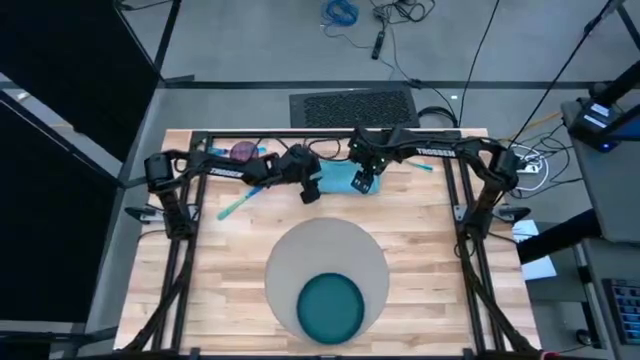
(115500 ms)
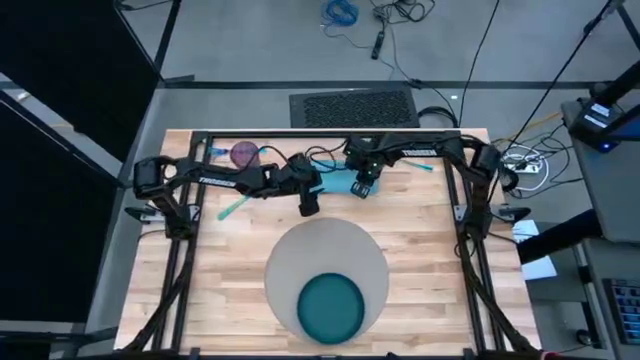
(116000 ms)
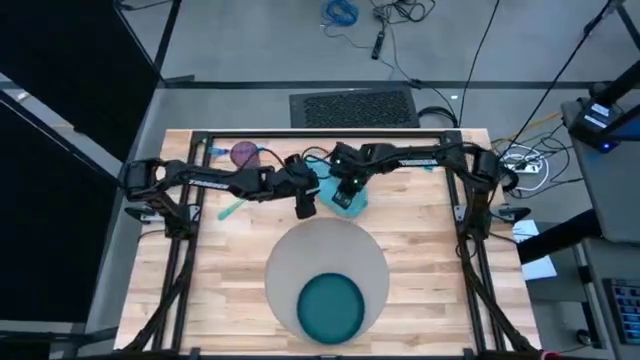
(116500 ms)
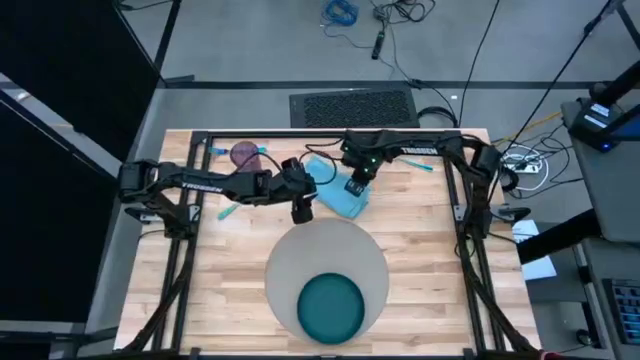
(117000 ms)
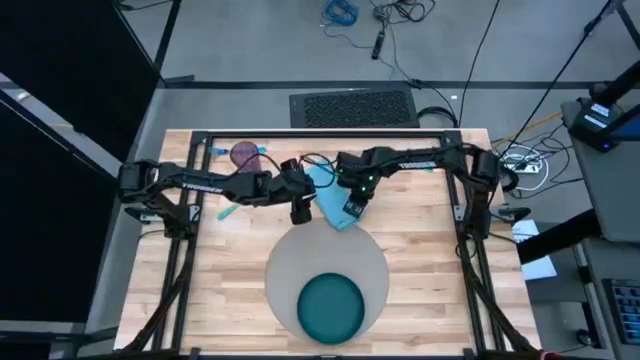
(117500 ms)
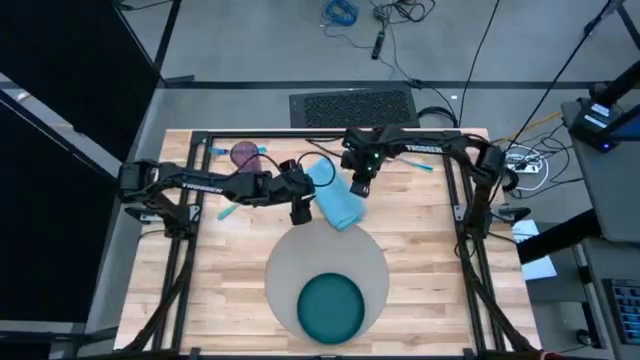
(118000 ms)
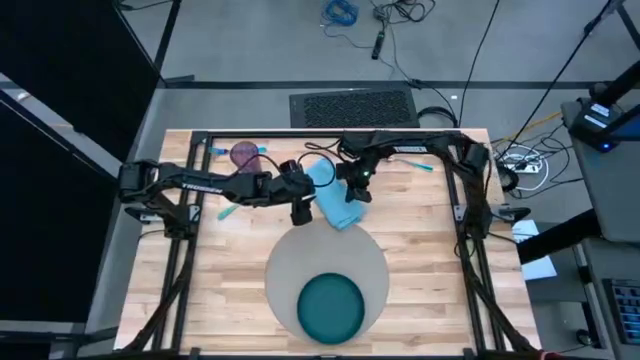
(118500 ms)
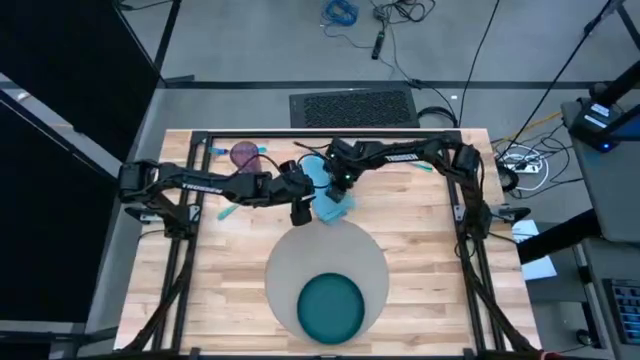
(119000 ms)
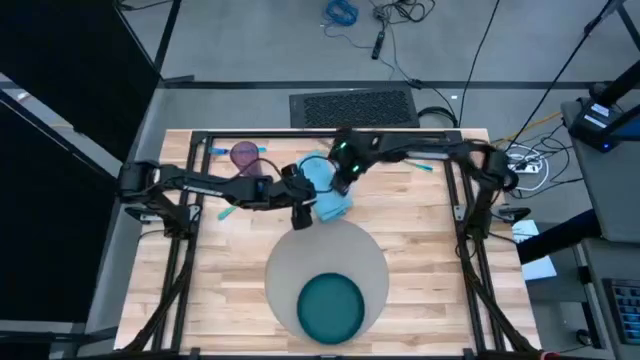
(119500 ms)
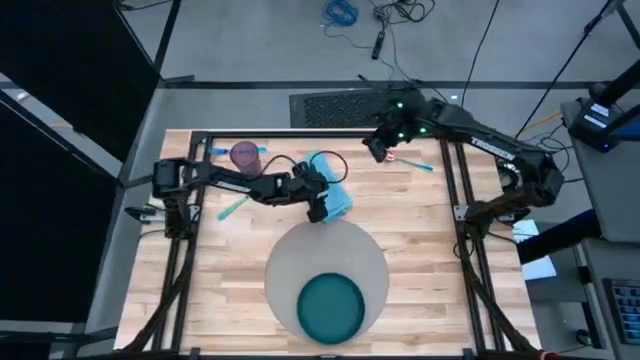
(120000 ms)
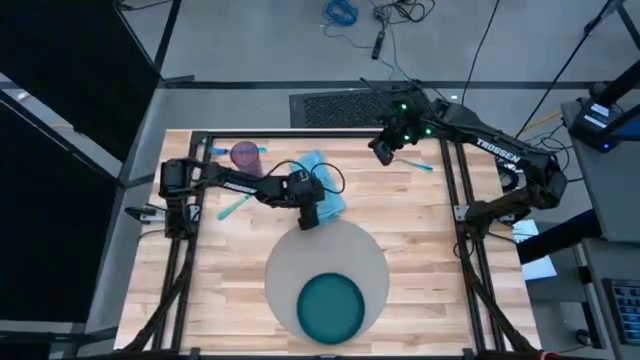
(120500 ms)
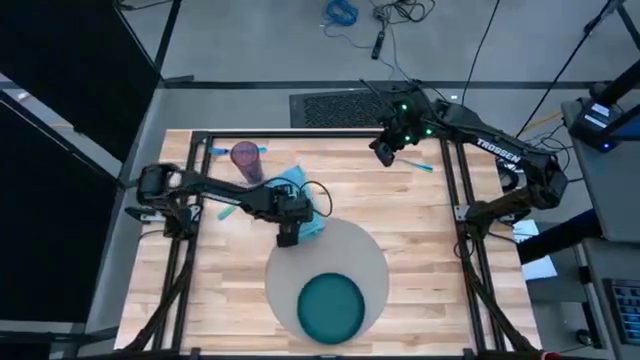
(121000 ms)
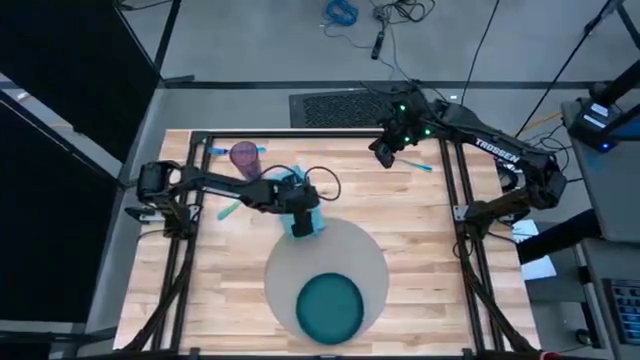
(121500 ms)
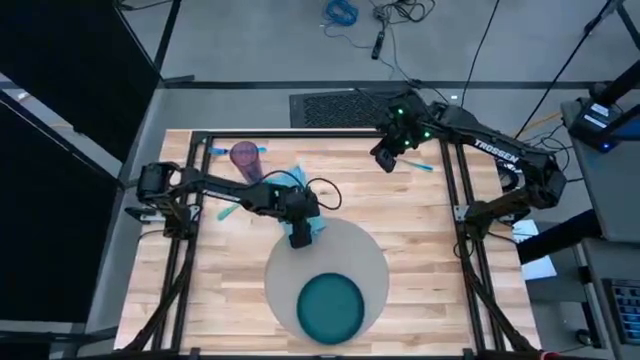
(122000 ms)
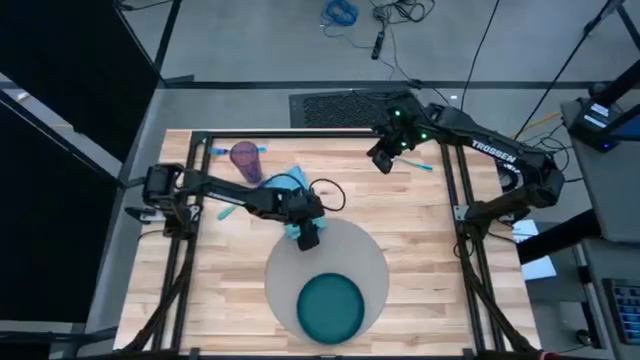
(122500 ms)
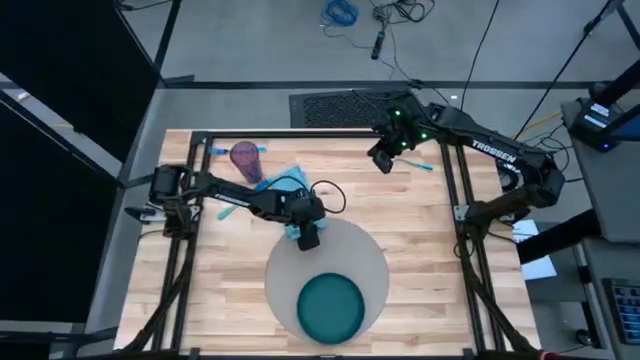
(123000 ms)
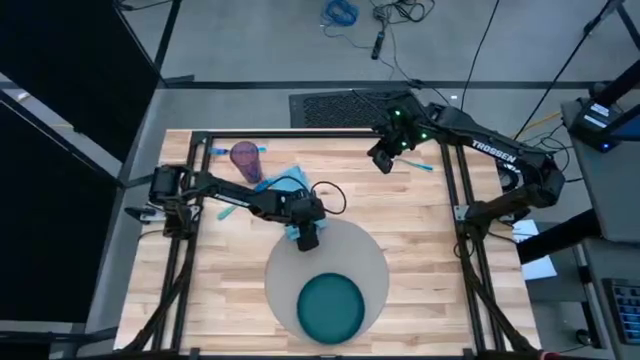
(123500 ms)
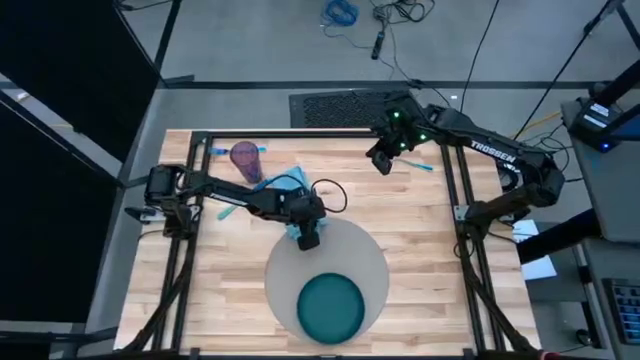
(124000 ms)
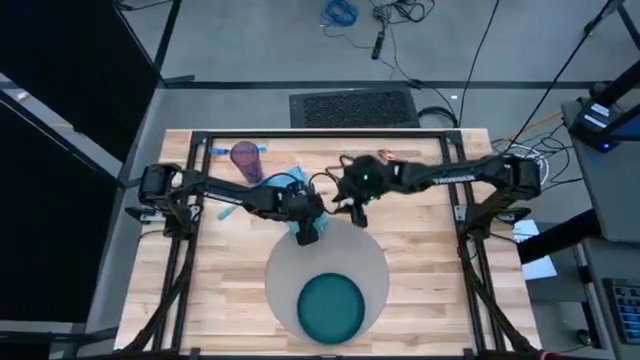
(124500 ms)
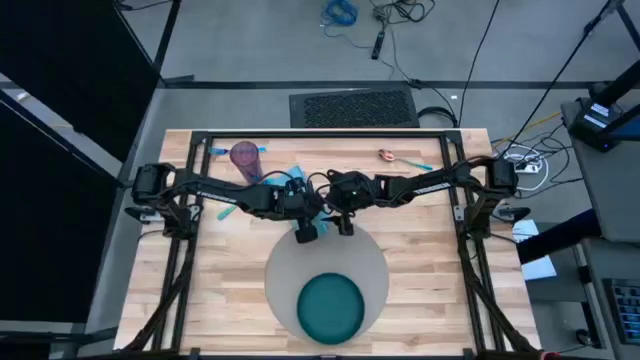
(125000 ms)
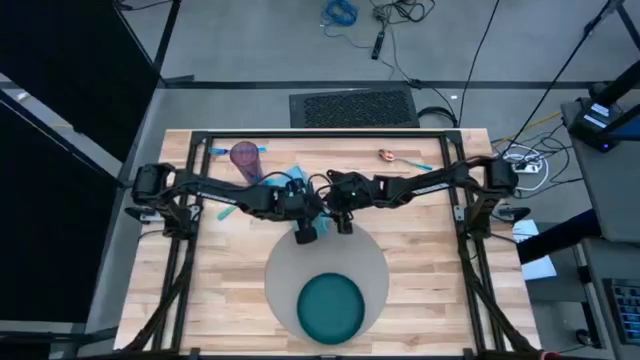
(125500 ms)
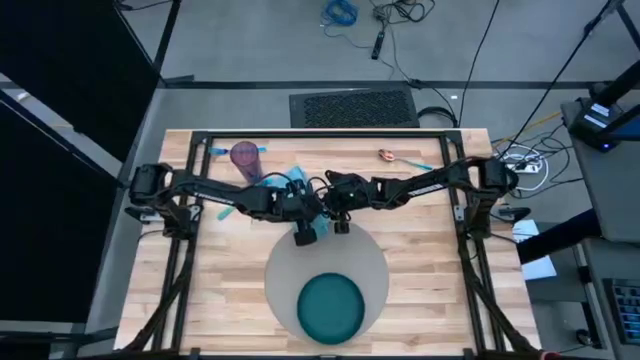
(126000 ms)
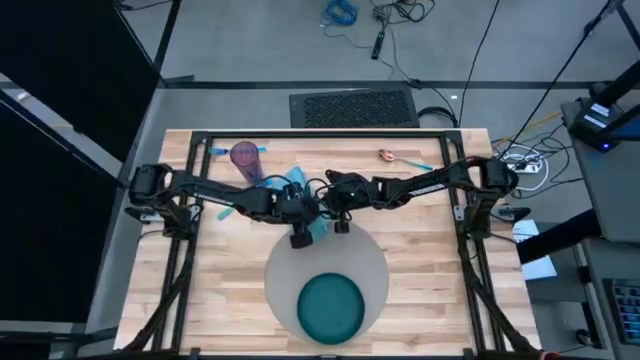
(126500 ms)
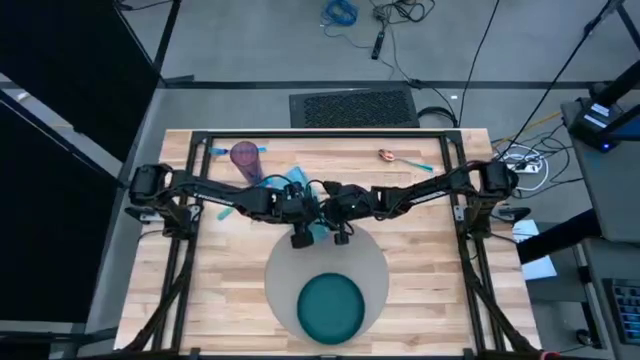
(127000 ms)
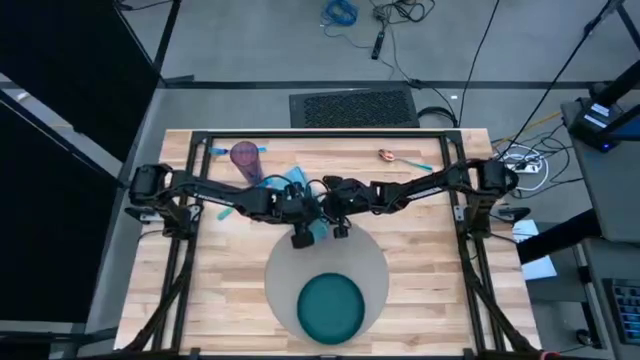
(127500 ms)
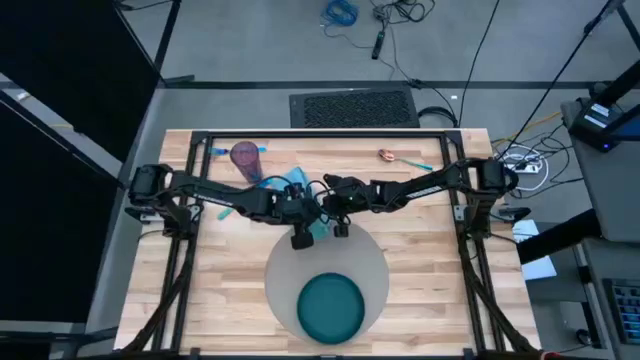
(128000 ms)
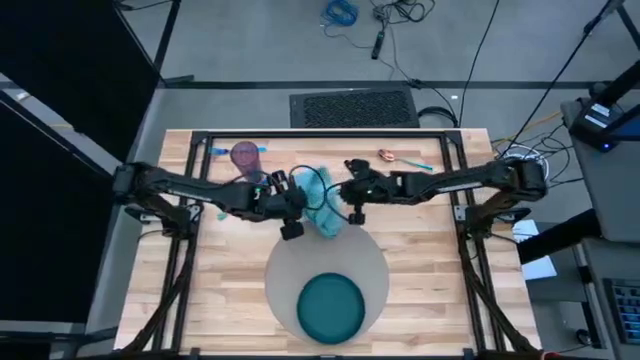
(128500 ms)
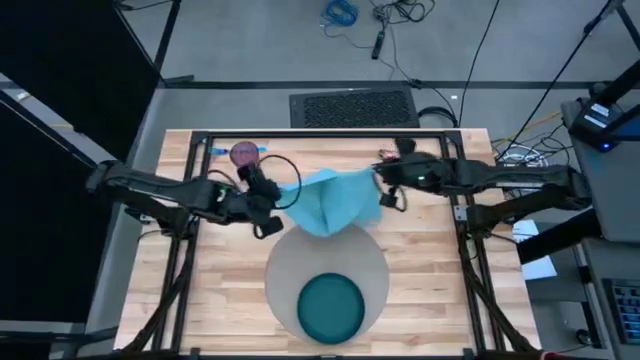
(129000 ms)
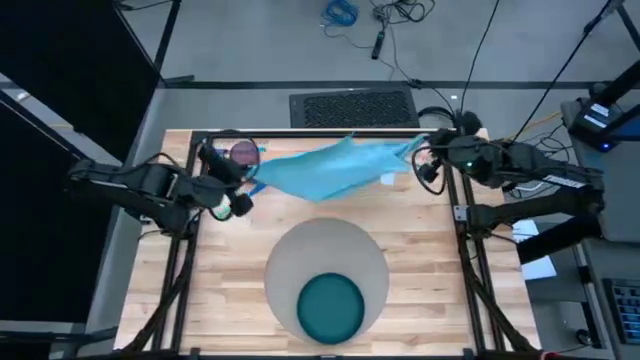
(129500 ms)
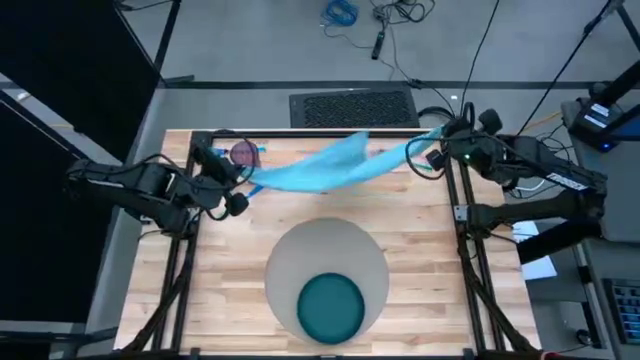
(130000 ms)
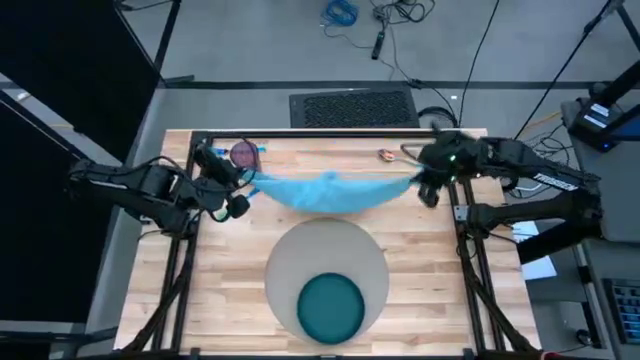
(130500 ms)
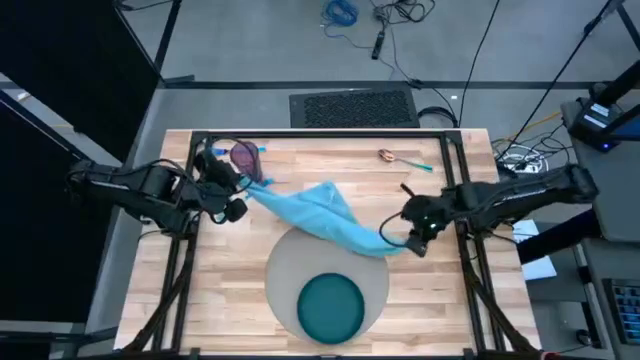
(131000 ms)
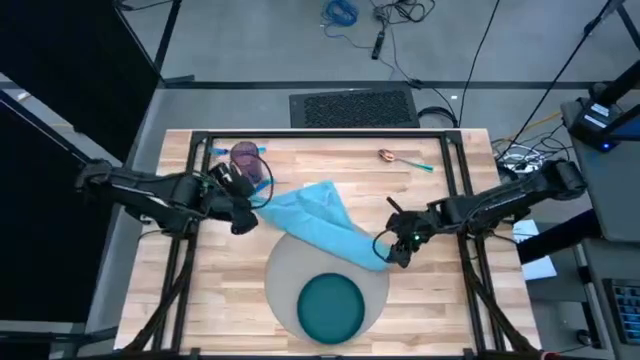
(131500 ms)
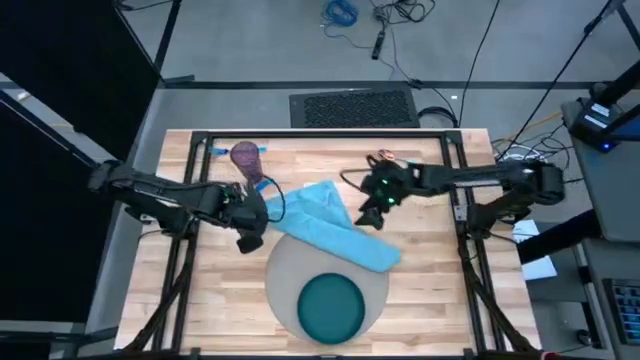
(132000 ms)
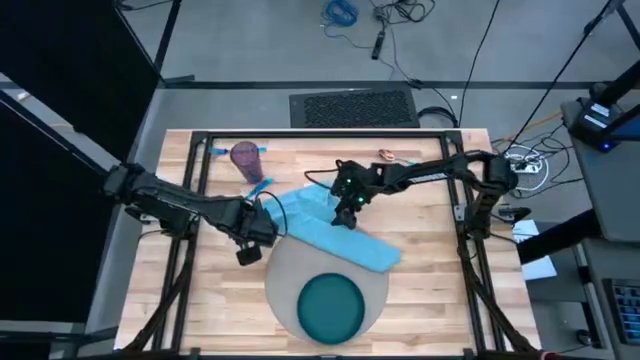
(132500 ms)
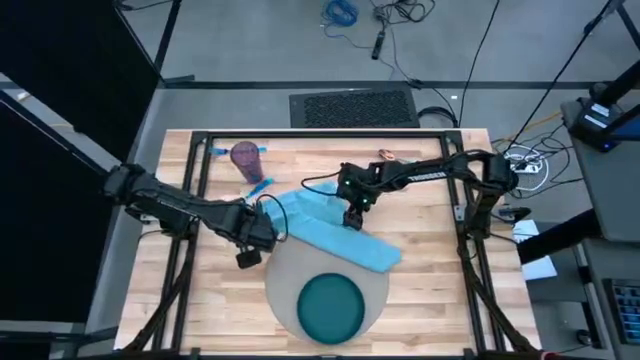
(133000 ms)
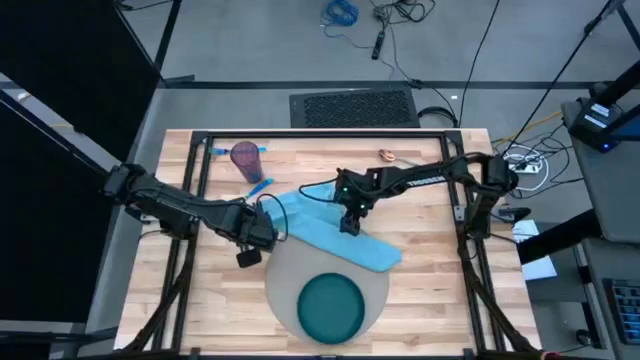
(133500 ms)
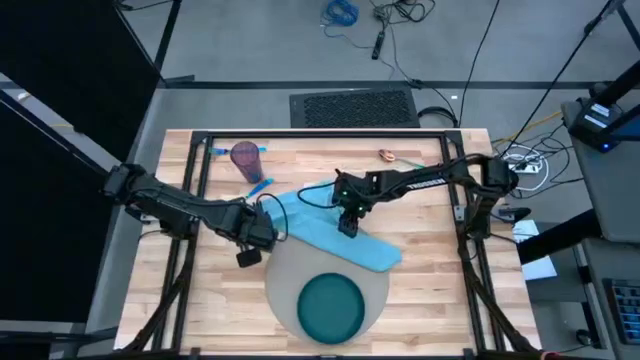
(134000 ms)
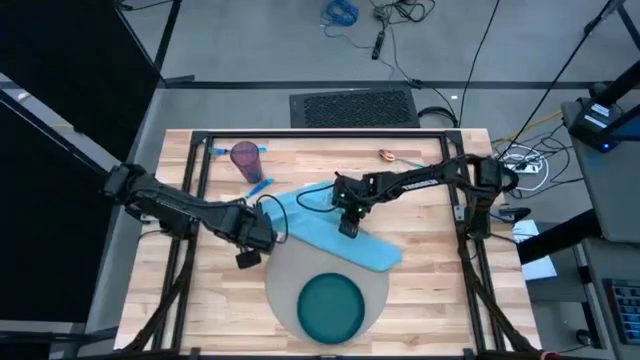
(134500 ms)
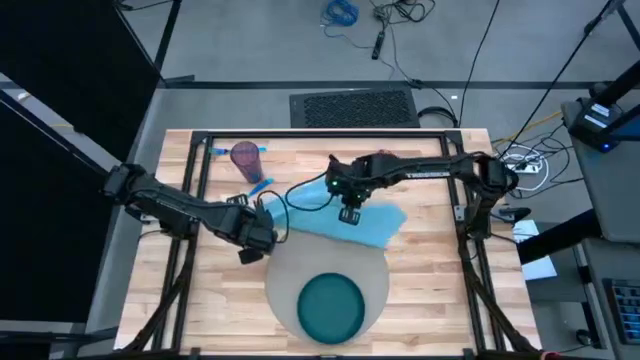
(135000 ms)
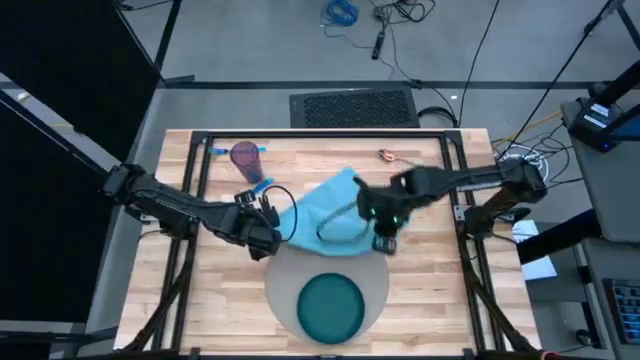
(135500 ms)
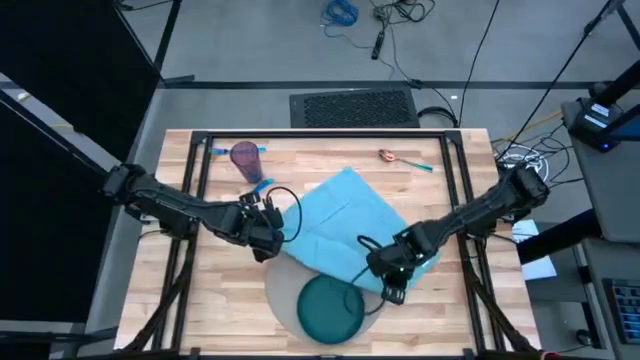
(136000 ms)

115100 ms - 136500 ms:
Task: Set table place
Fold the blue napkin
